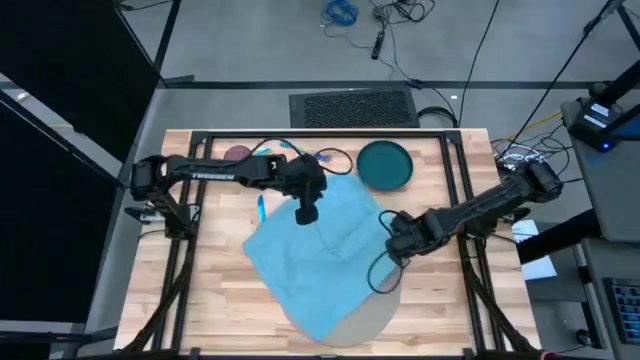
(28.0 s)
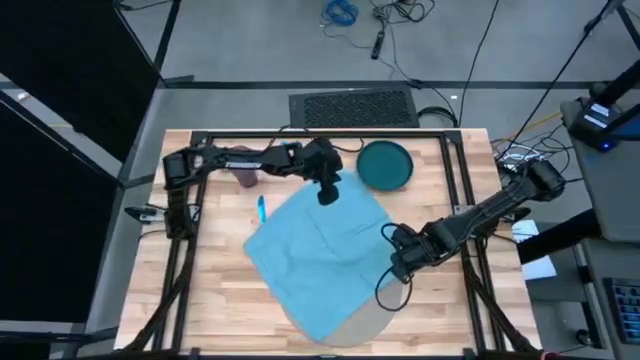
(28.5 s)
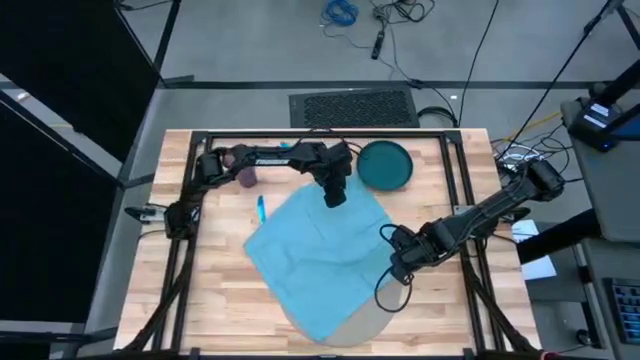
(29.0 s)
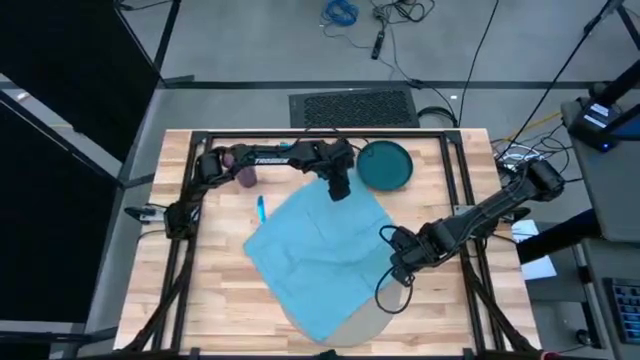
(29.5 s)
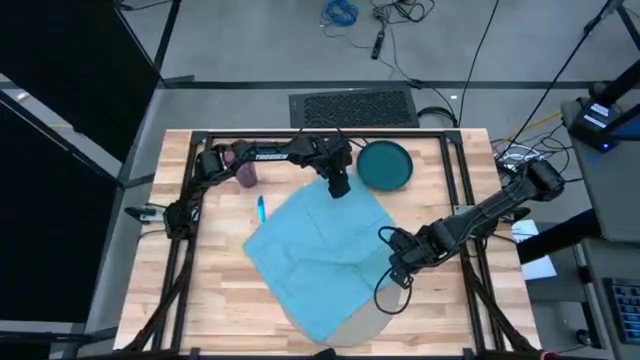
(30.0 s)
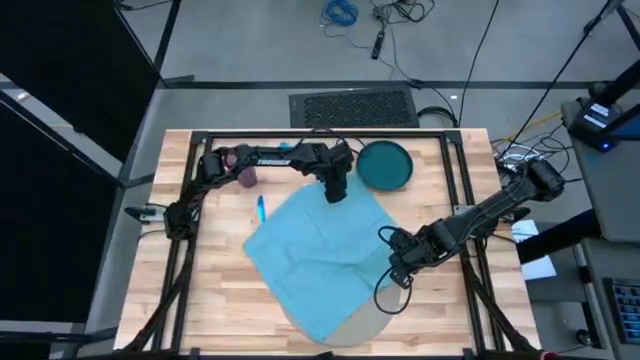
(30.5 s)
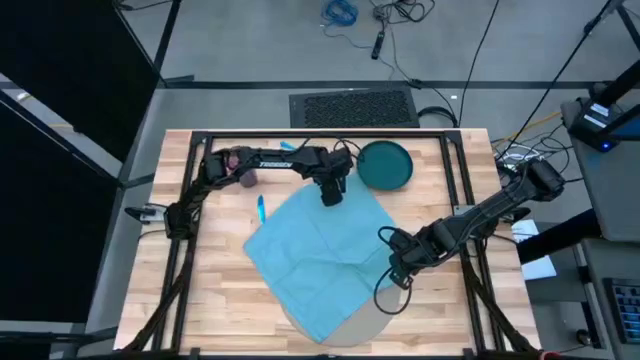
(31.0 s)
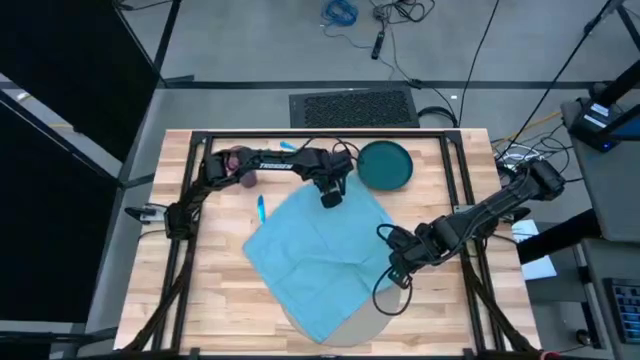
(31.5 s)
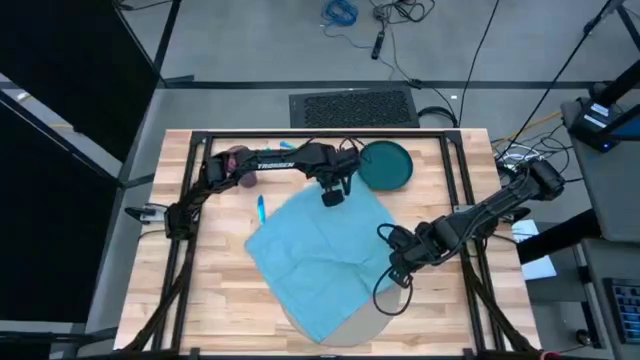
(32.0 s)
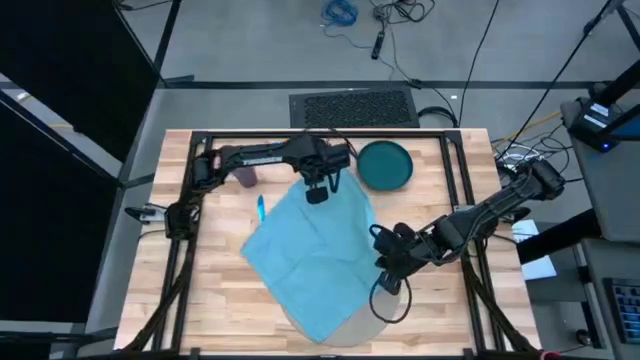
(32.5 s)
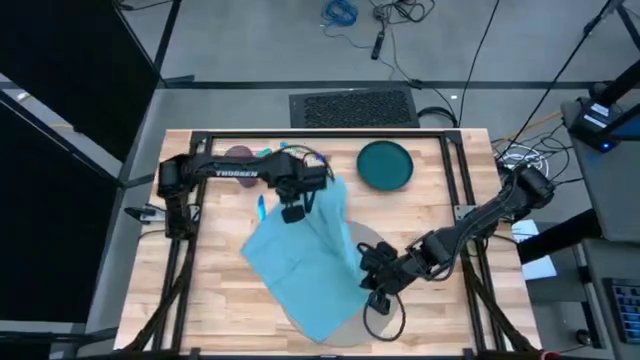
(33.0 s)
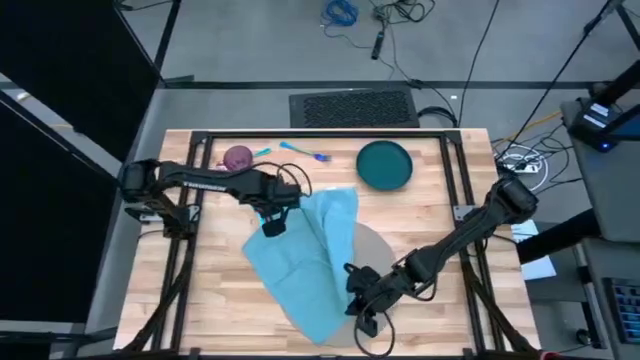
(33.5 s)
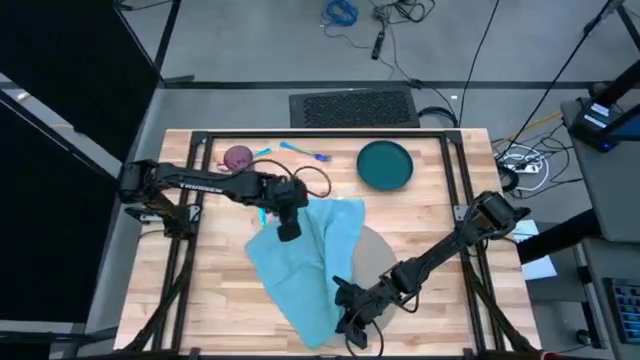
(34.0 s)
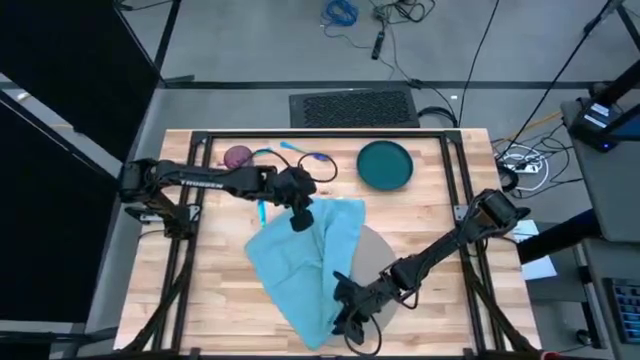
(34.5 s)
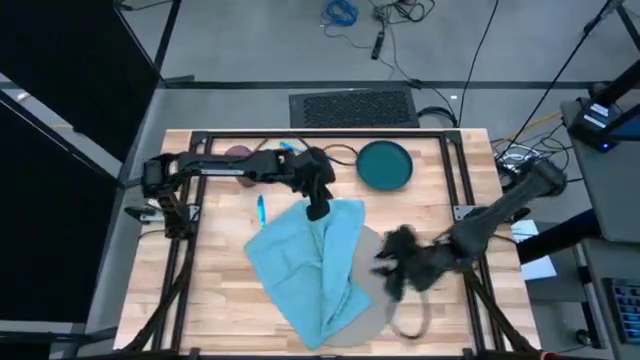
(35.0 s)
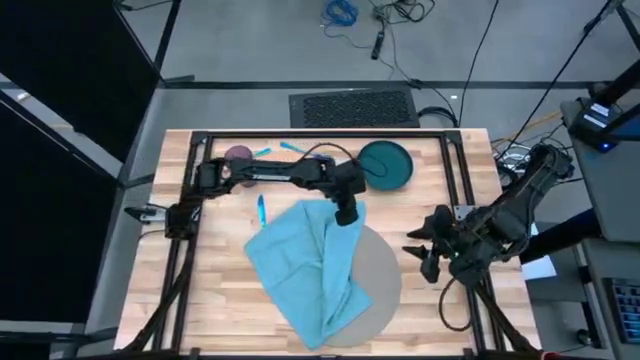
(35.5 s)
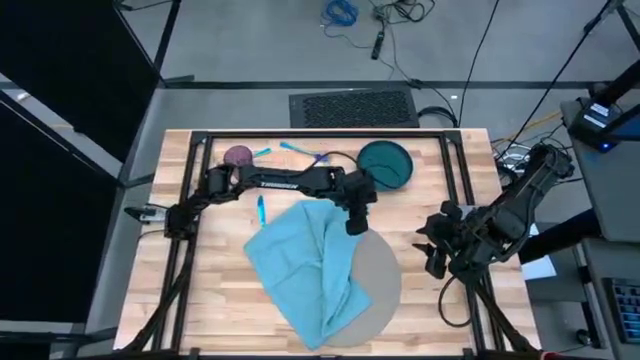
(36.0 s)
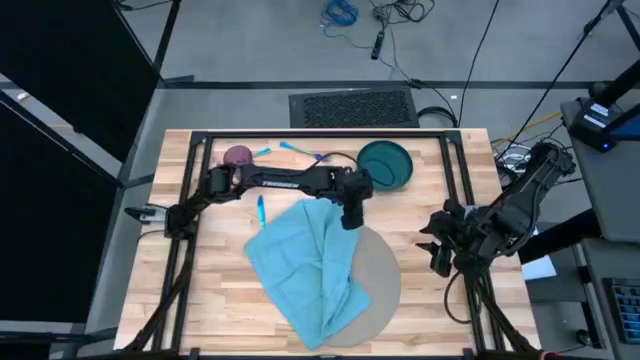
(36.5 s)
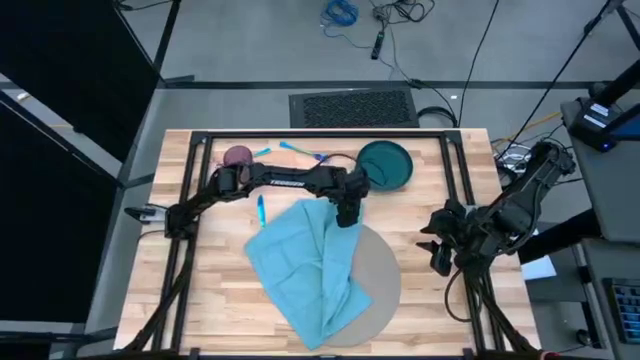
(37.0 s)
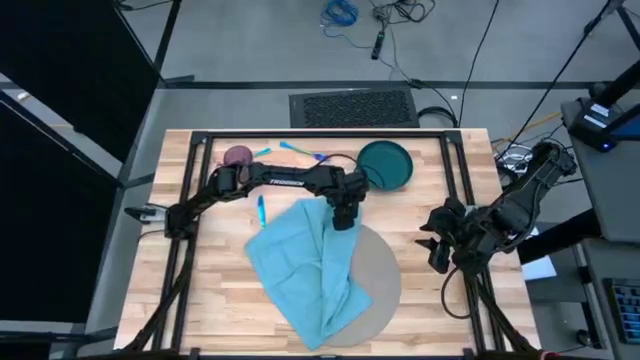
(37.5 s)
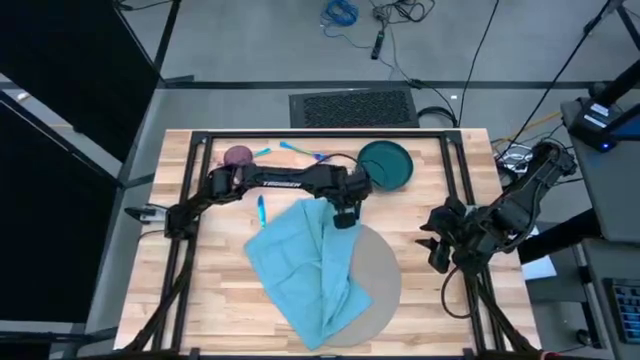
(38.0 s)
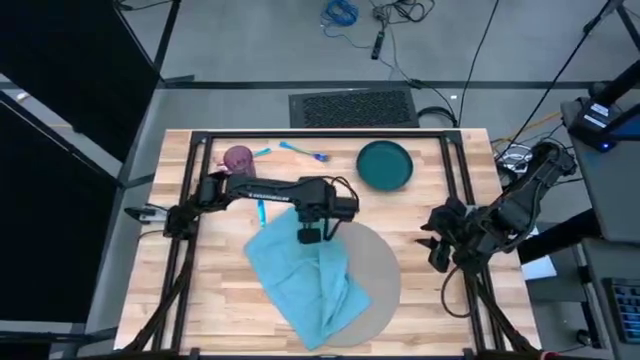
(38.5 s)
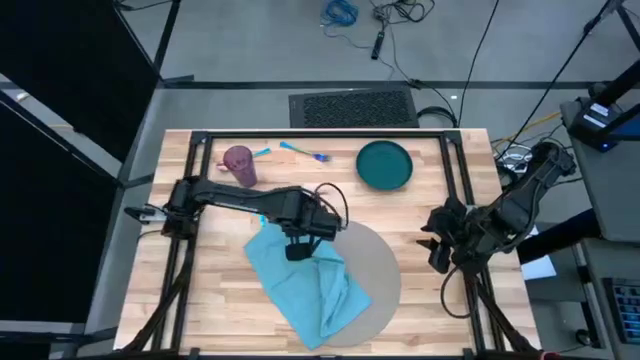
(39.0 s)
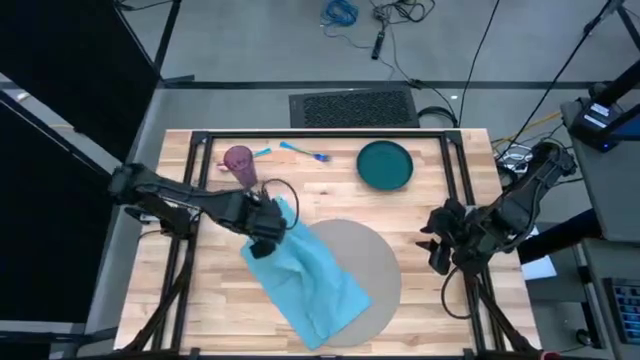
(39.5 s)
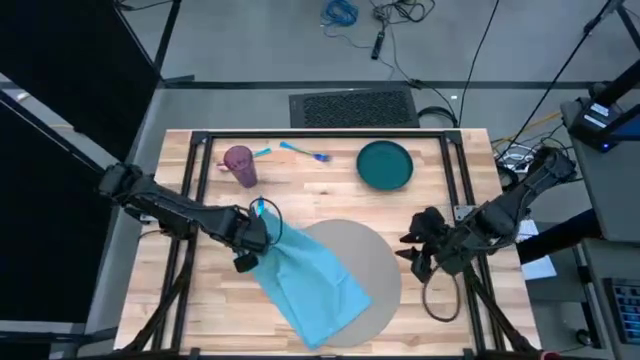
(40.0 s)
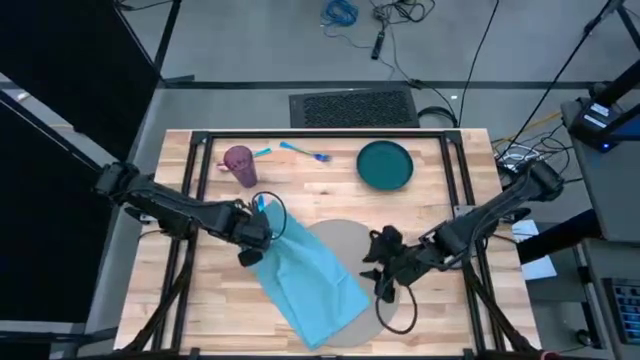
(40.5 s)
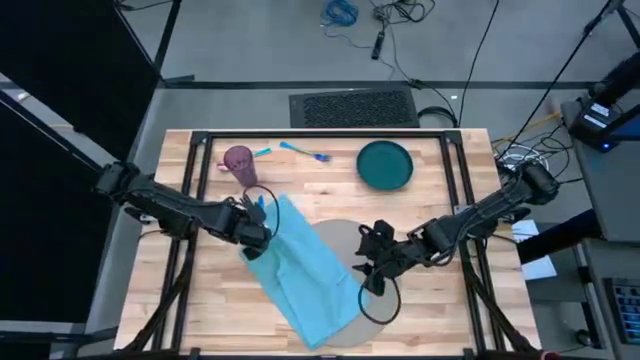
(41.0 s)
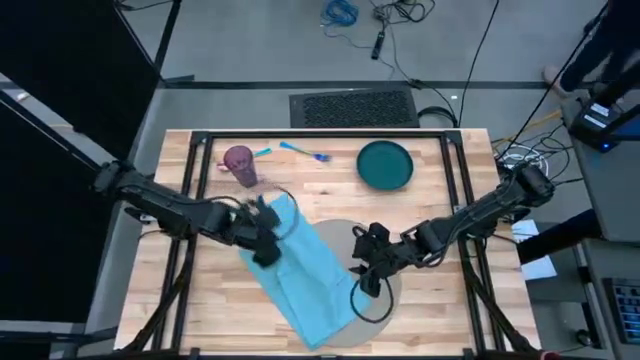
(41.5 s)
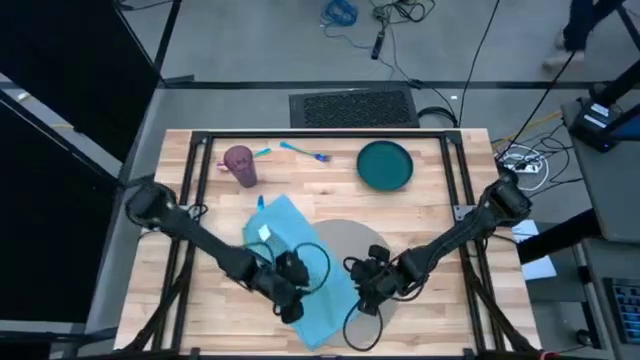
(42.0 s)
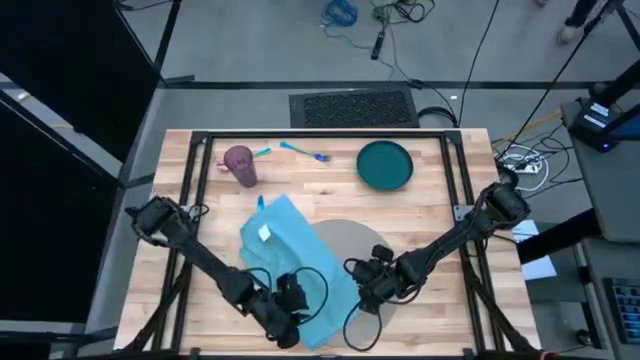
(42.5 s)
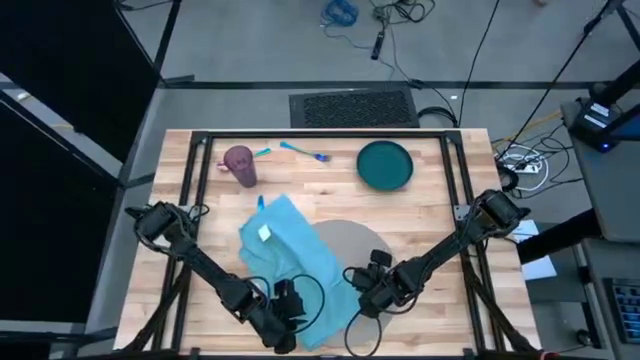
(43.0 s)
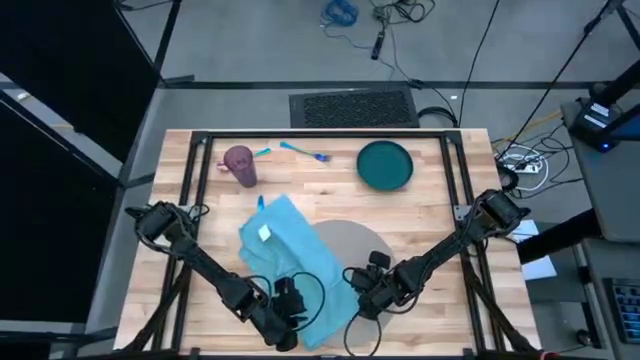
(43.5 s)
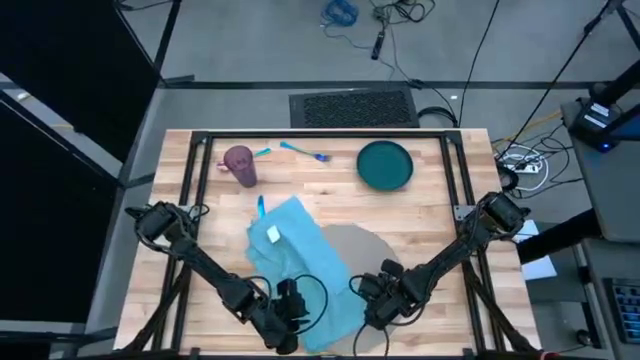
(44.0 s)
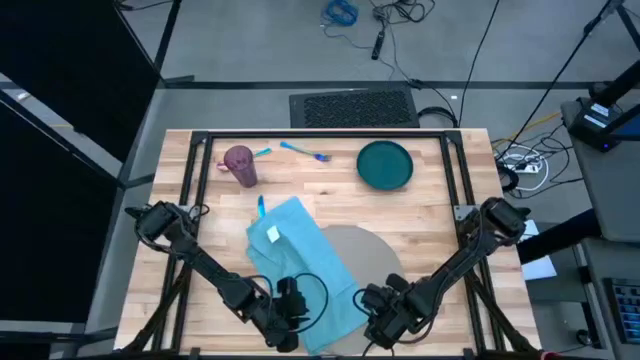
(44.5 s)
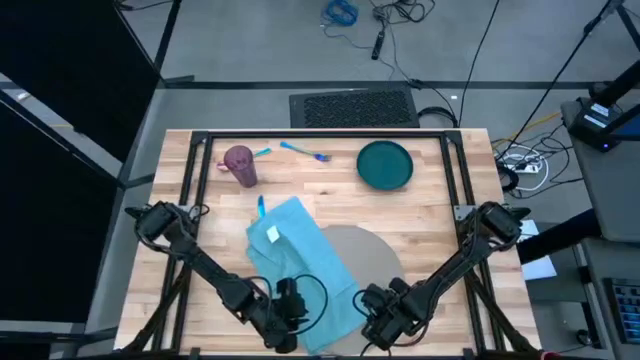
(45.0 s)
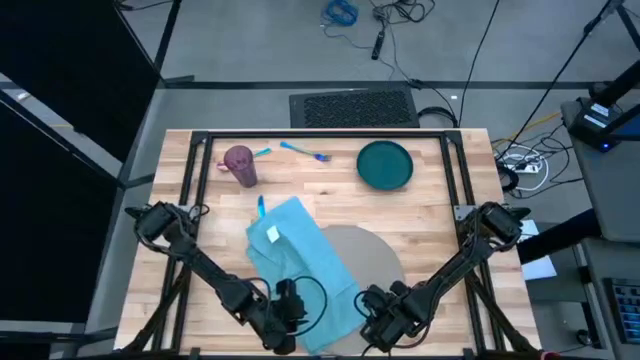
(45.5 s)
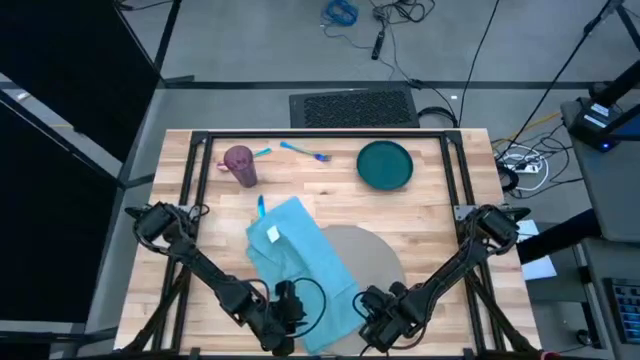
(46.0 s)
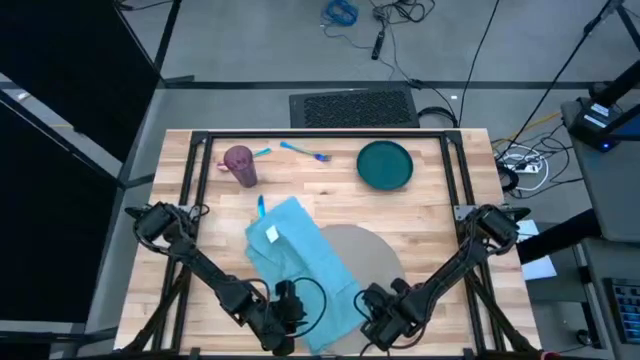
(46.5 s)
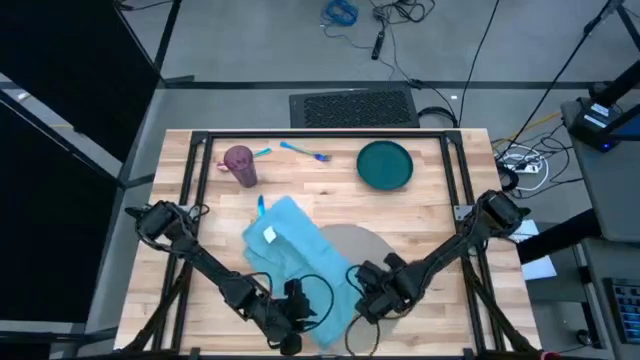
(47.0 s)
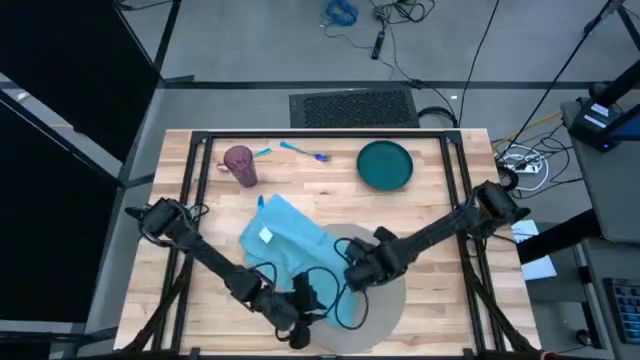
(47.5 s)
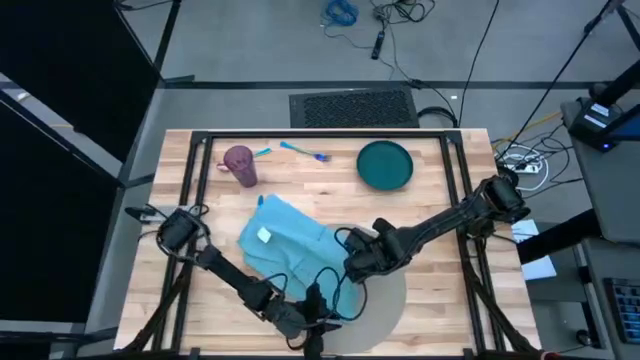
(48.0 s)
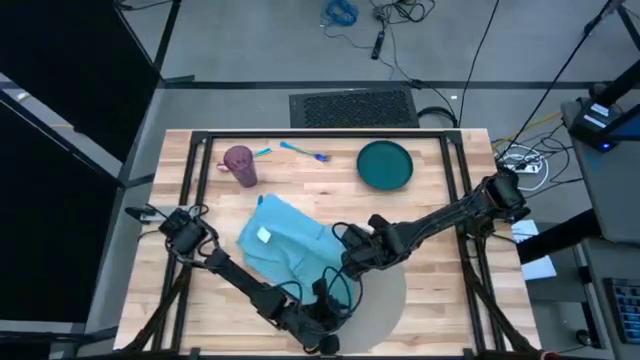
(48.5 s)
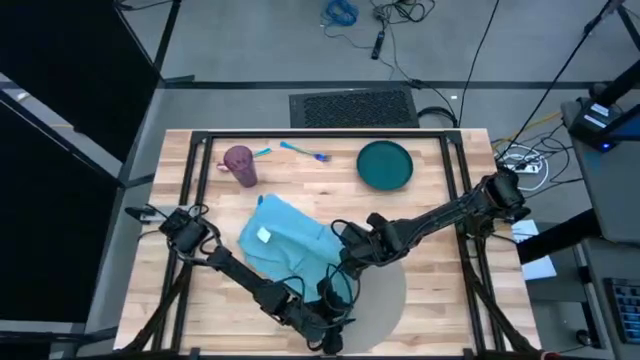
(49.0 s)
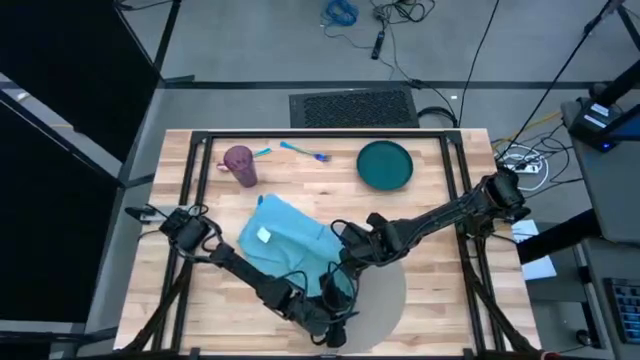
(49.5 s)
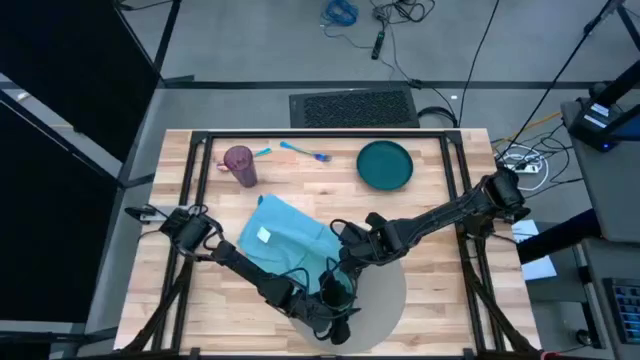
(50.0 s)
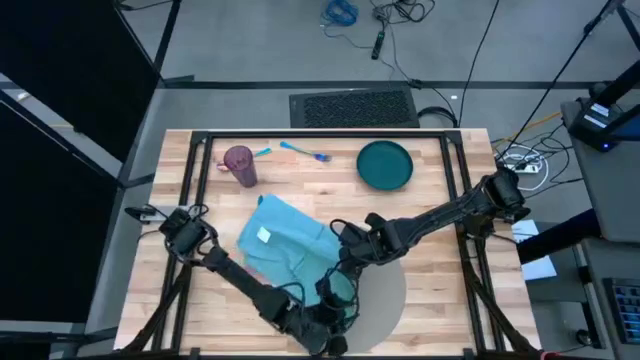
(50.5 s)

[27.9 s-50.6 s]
Task: Set table place
Fold the blue napkin
